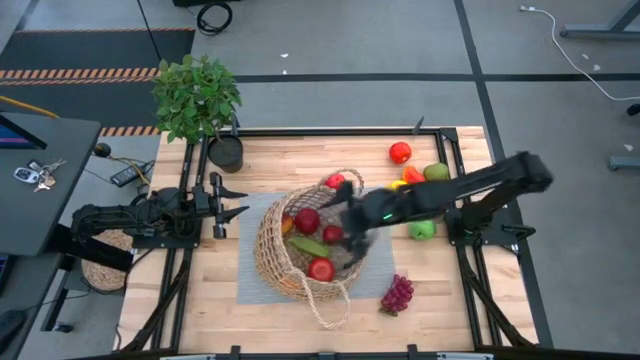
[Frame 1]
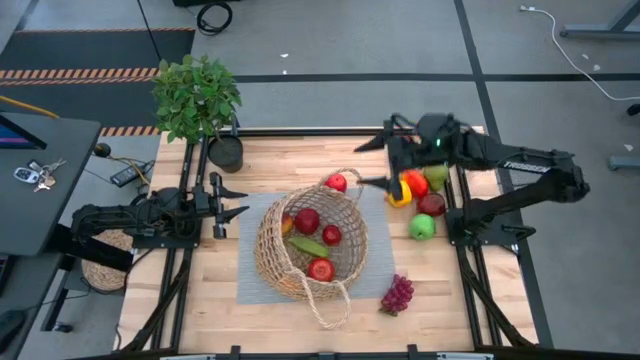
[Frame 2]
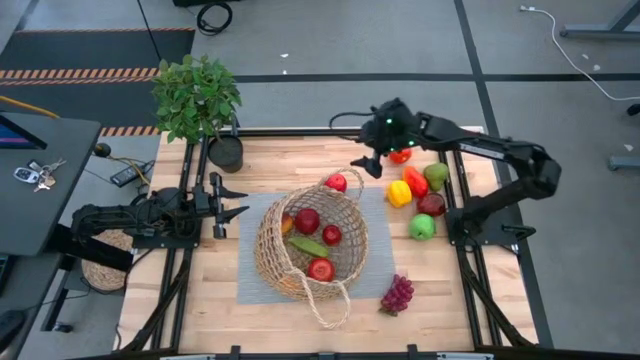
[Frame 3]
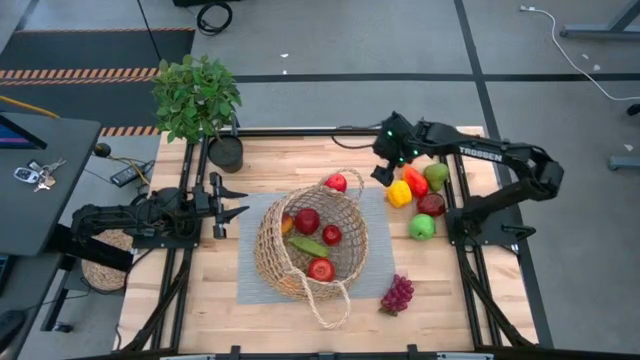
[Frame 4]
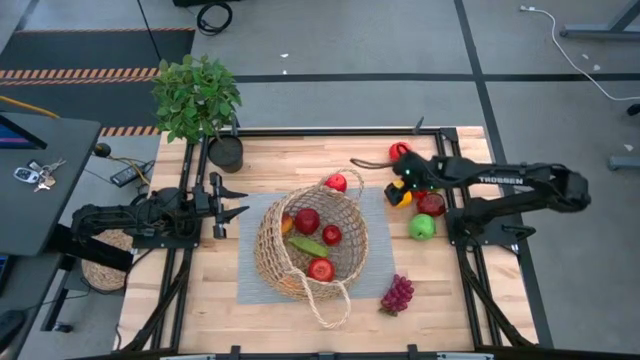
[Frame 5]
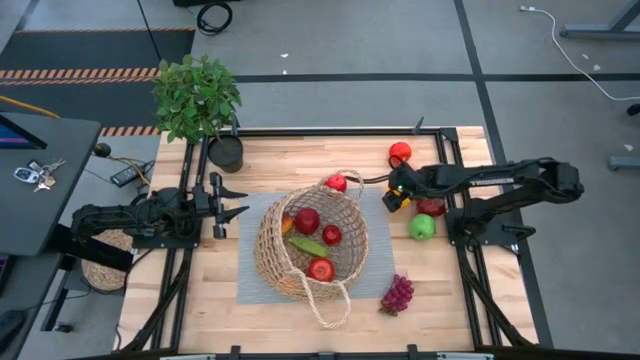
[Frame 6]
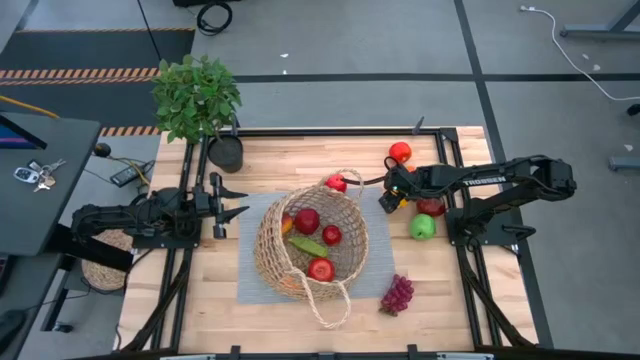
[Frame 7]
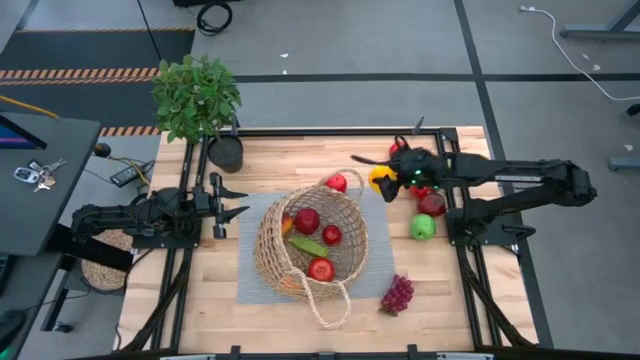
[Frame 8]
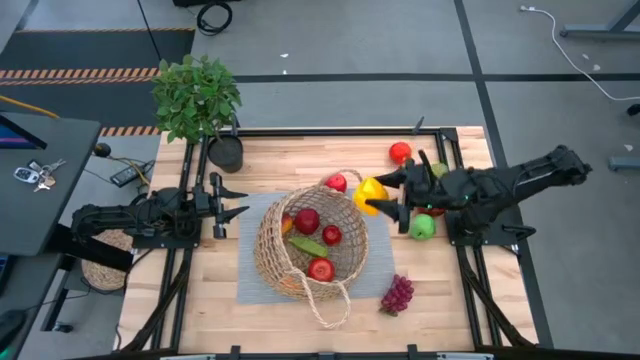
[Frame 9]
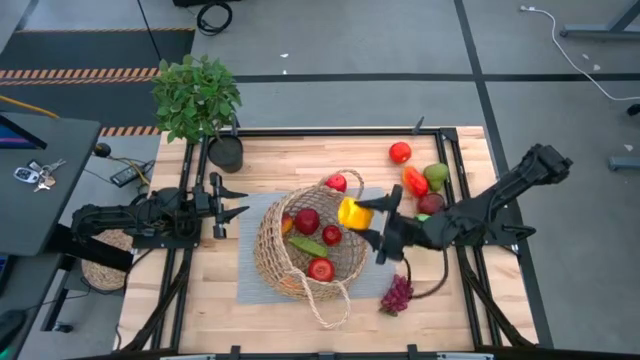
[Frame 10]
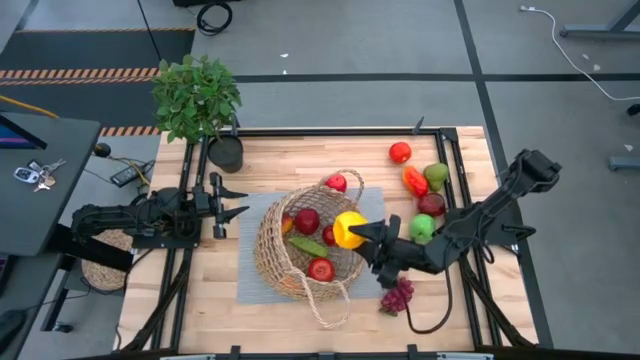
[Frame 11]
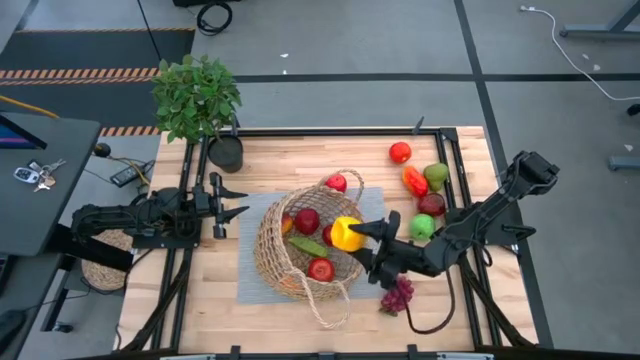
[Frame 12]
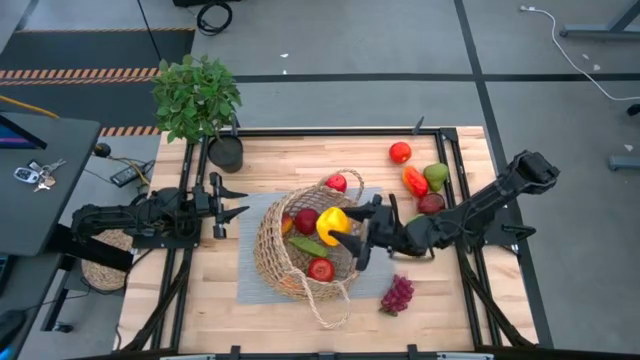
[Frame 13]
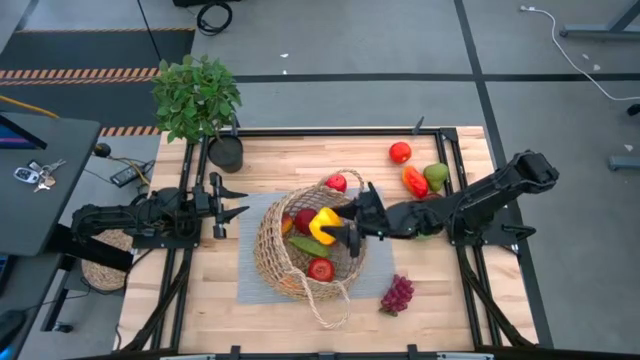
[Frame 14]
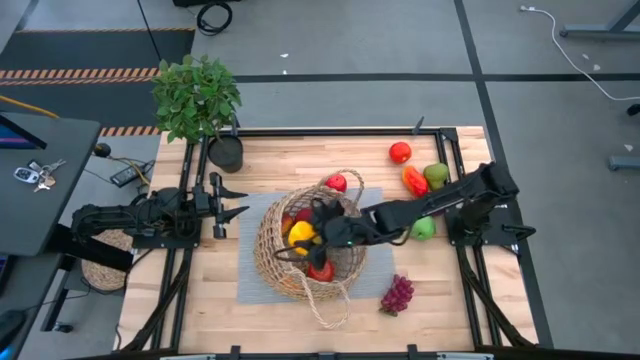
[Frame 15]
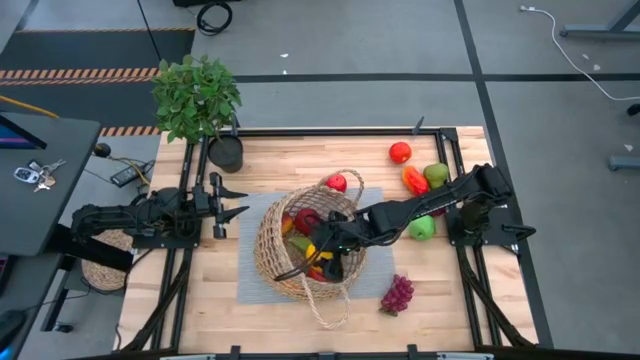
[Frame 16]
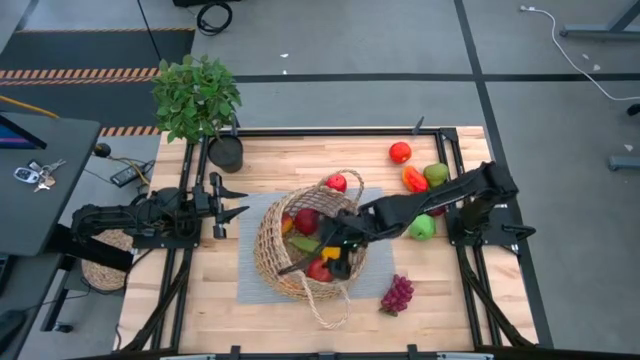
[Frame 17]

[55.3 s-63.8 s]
Task: Build produce basket
Put the yellow bell pepper into the brown basket

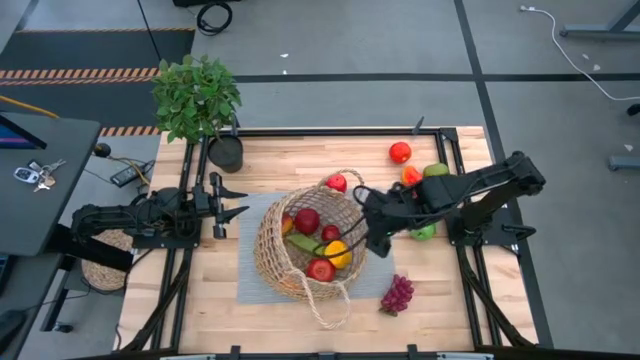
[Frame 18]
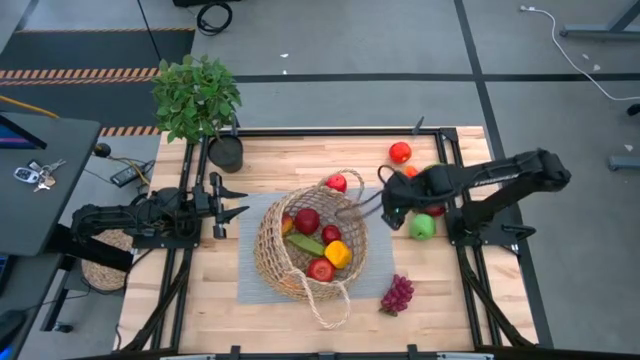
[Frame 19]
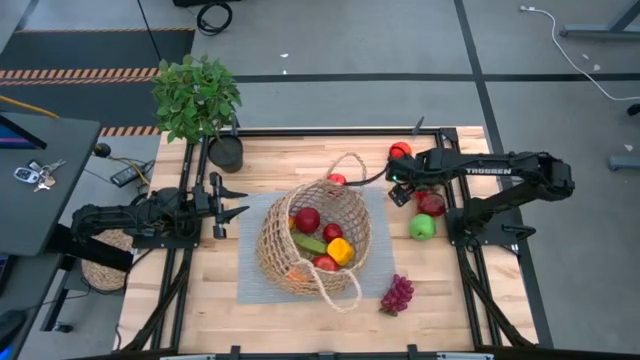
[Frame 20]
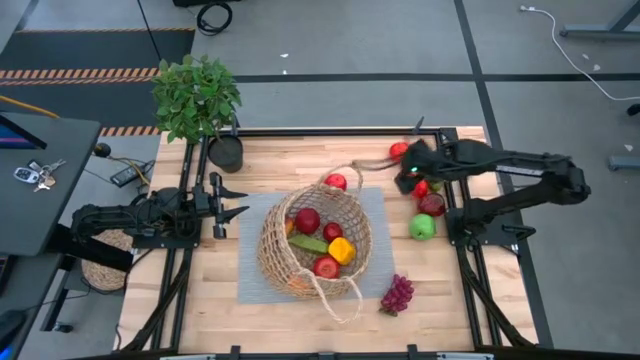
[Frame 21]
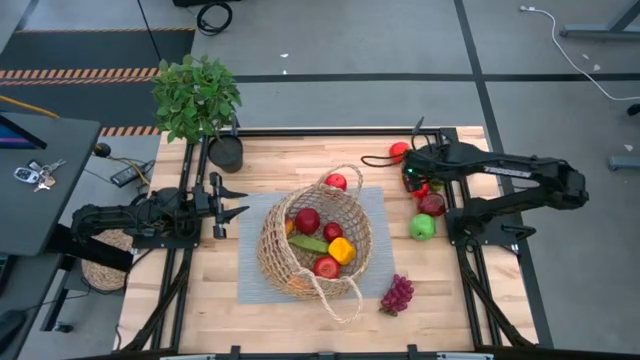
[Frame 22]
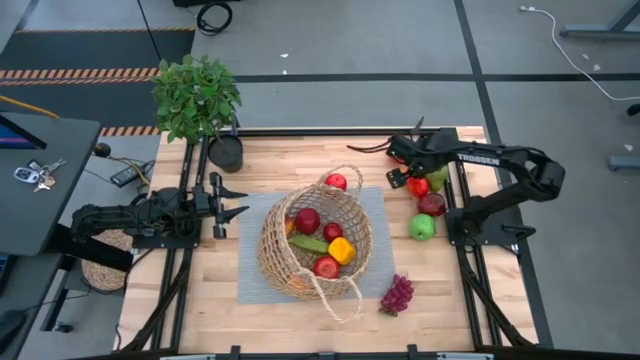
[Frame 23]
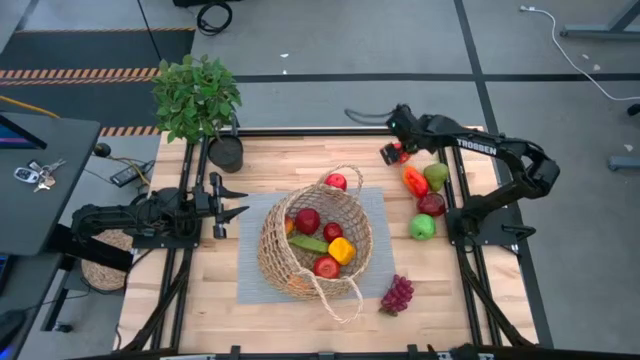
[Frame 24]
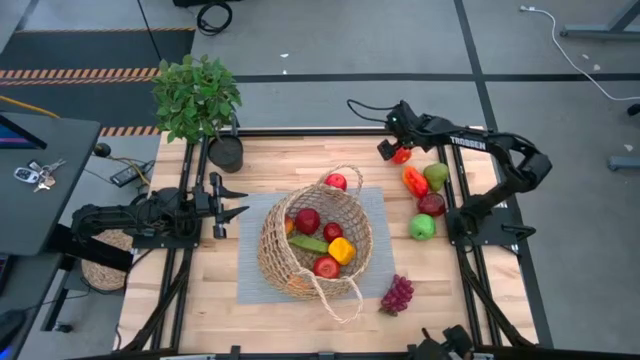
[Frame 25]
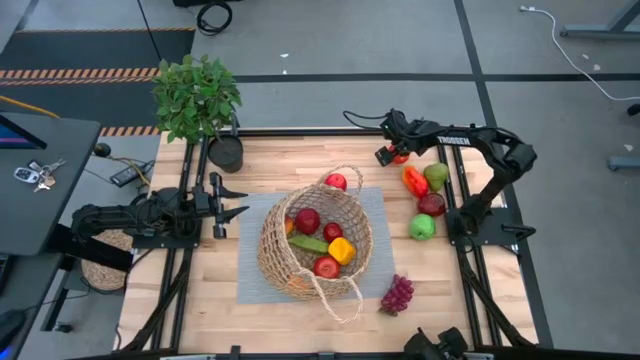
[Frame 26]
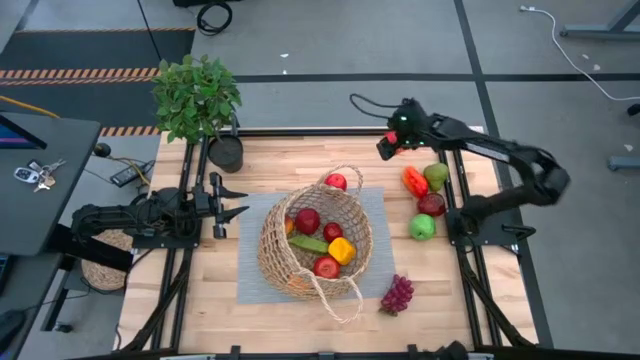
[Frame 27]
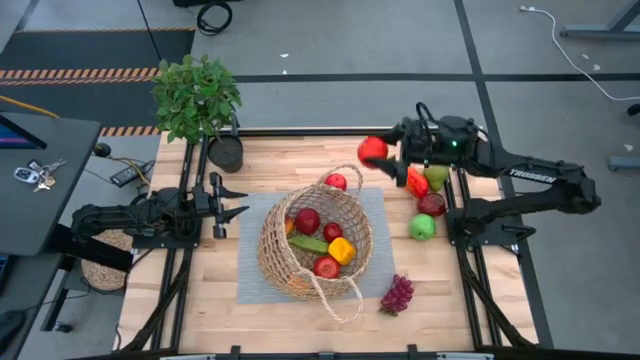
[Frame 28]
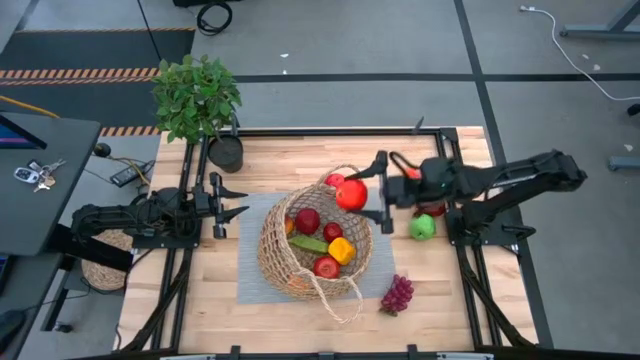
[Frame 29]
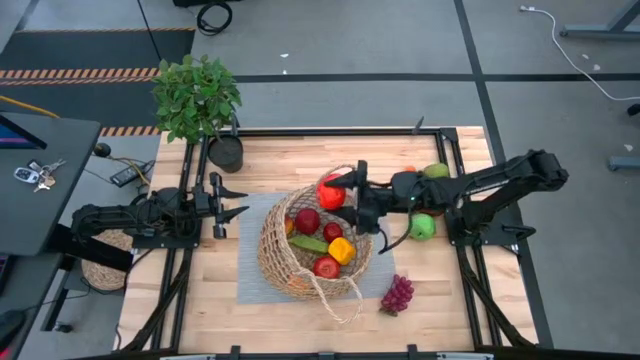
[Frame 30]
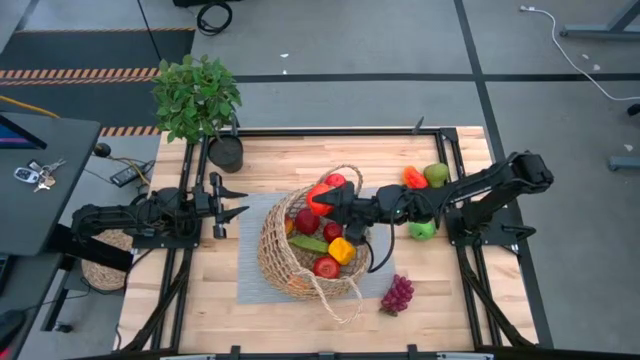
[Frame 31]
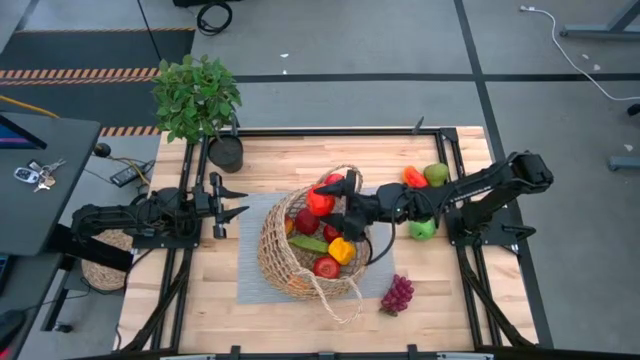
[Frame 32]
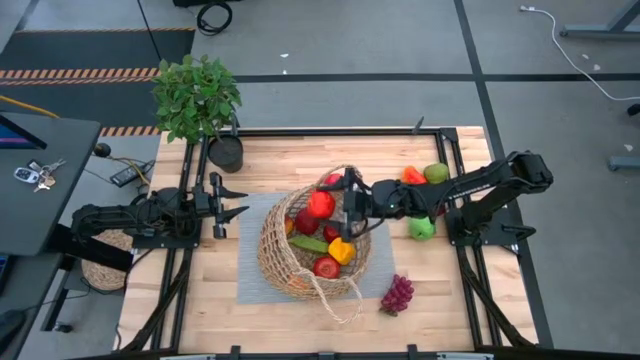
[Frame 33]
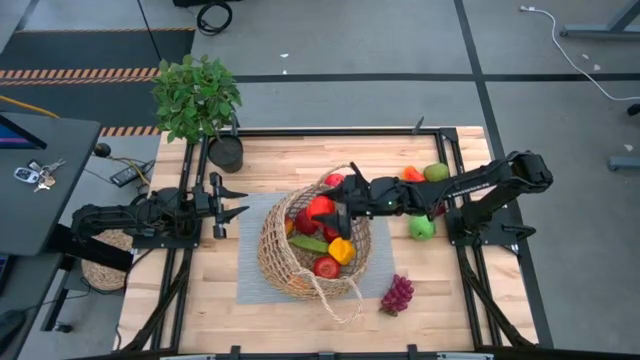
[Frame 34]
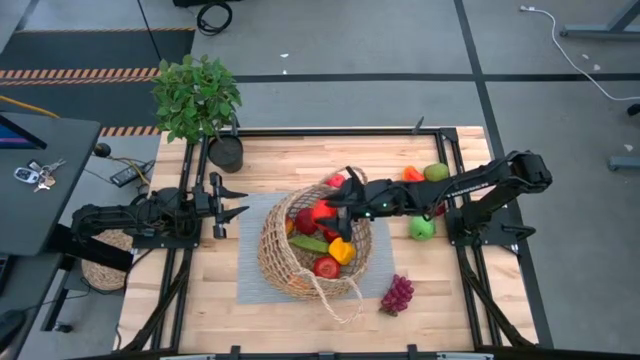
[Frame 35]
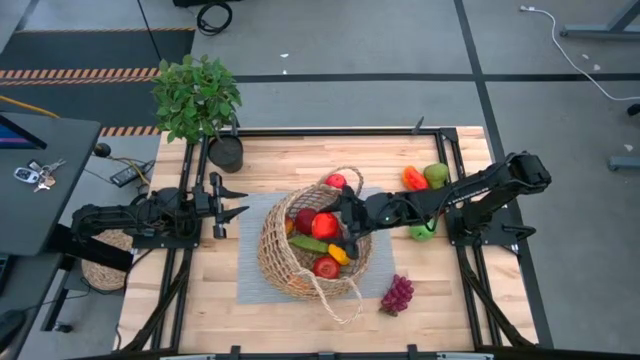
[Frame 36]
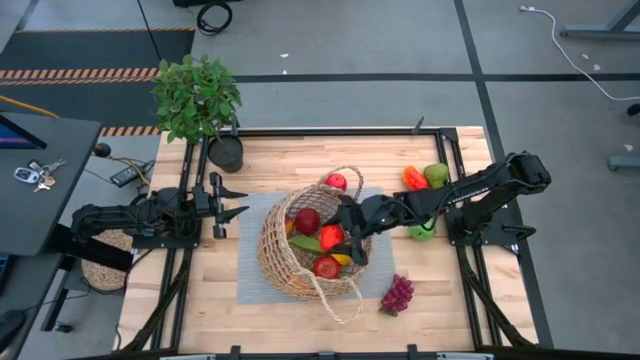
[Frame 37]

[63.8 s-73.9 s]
Put the red apple into the brown basket

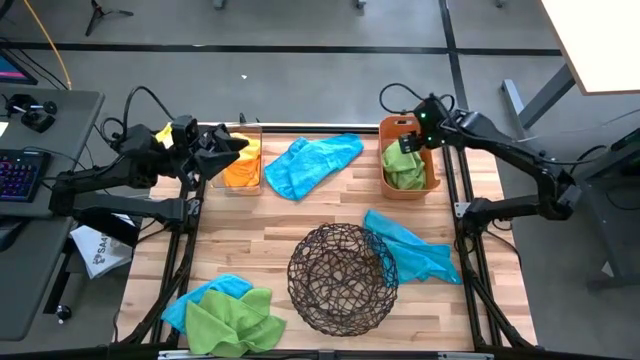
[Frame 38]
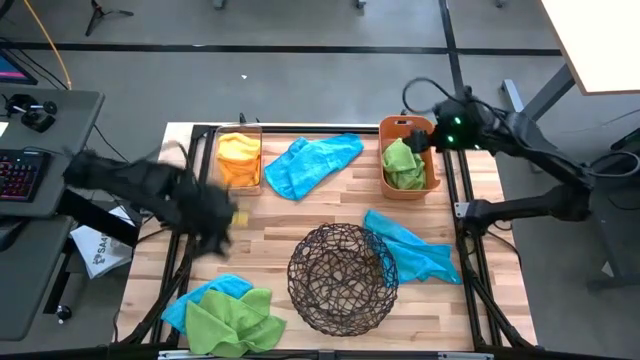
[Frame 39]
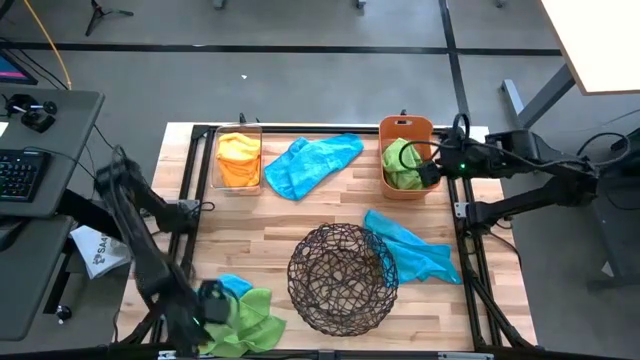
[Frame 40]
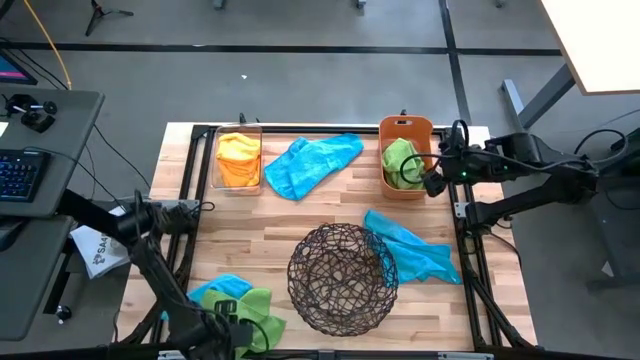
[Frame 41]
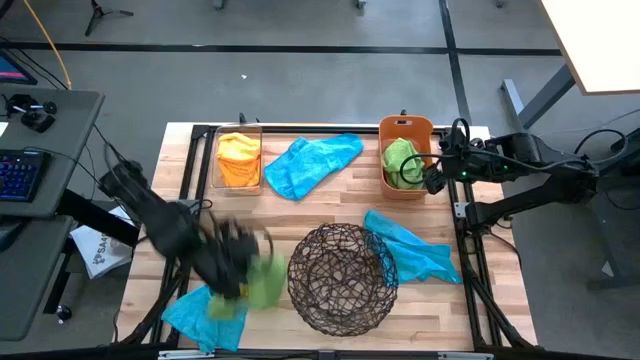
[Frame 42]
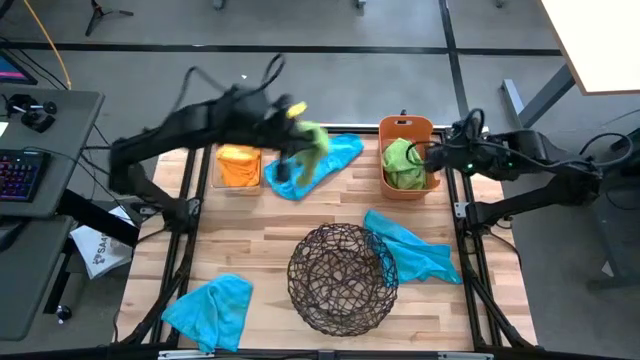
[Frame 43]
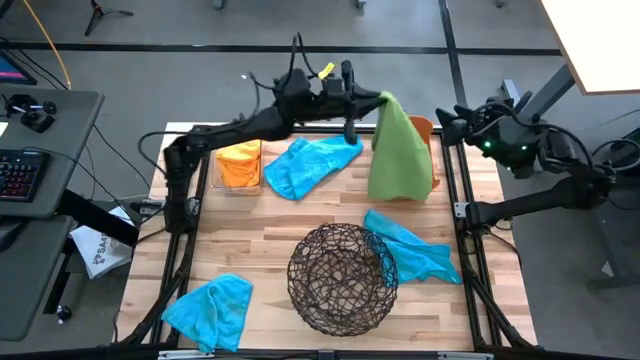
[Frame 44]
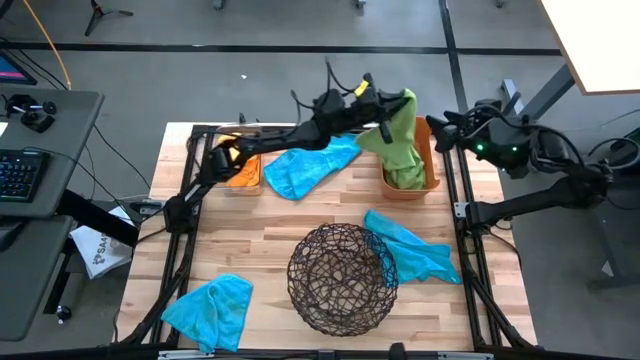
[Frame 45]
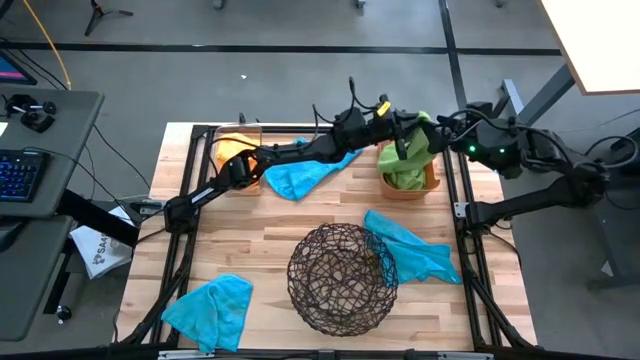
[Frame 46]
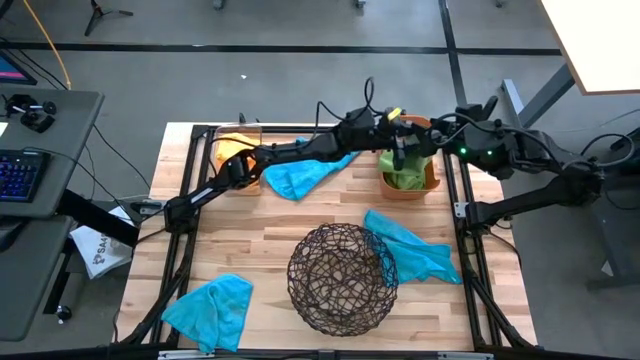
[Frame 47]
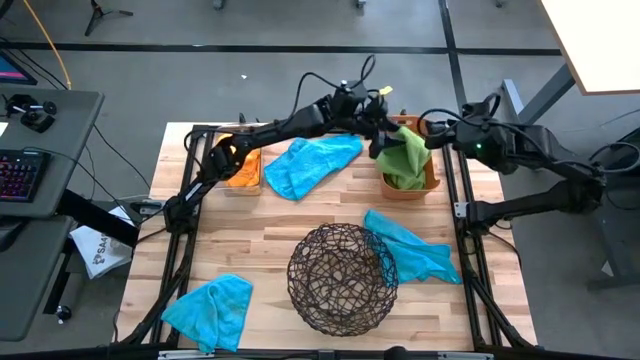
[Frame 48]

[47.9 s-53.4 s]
Task: Sort microfiber towel by color & place in baskets
Put the green towel into the orange bin
